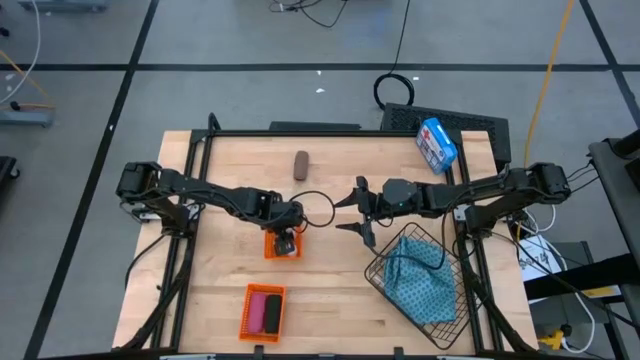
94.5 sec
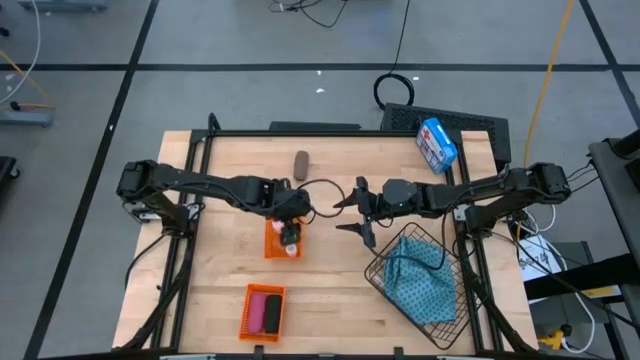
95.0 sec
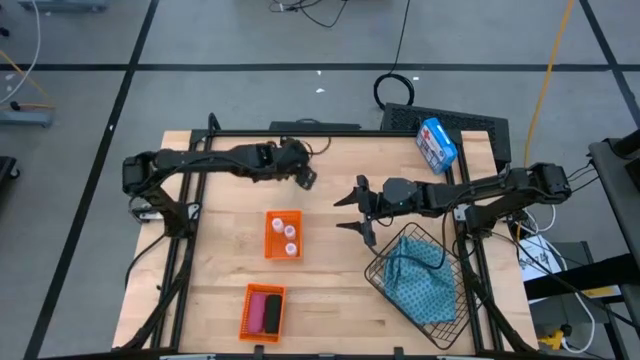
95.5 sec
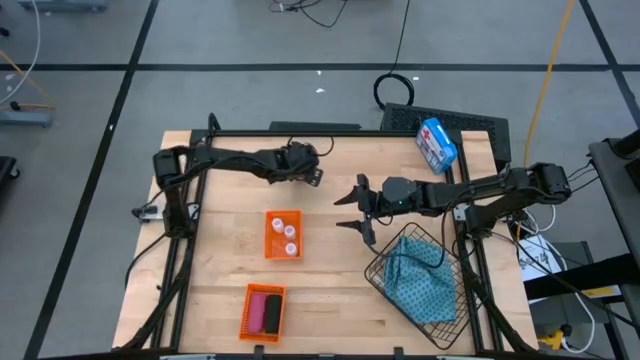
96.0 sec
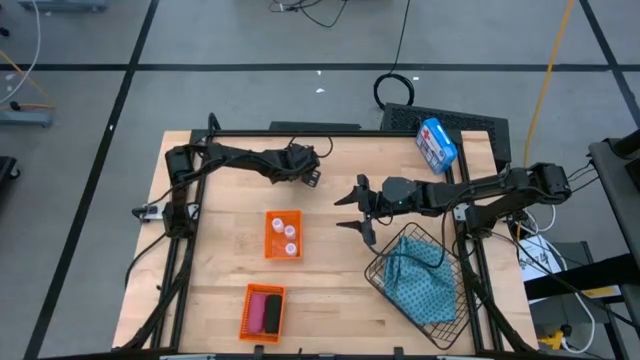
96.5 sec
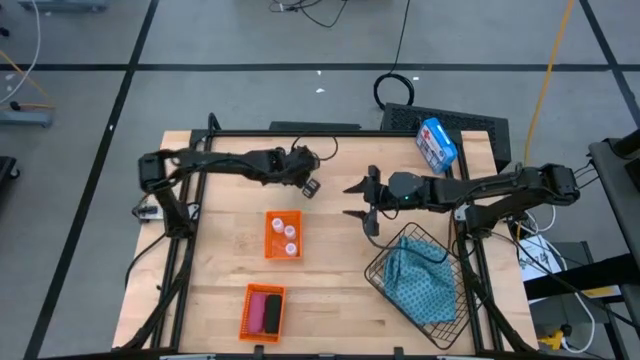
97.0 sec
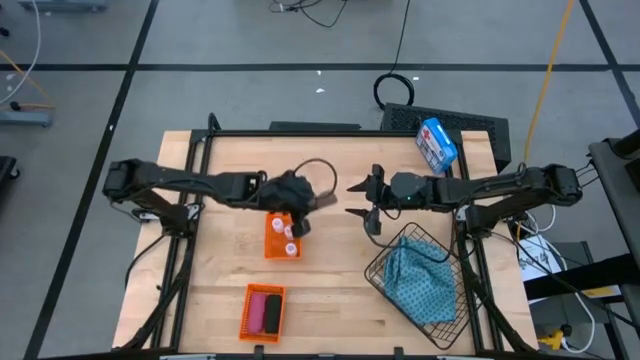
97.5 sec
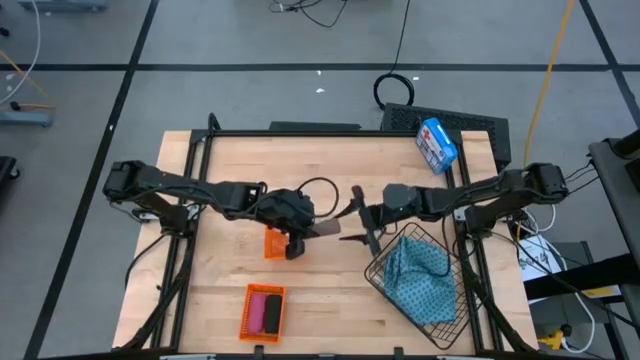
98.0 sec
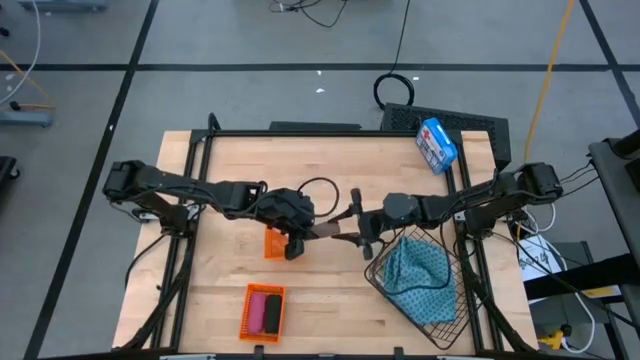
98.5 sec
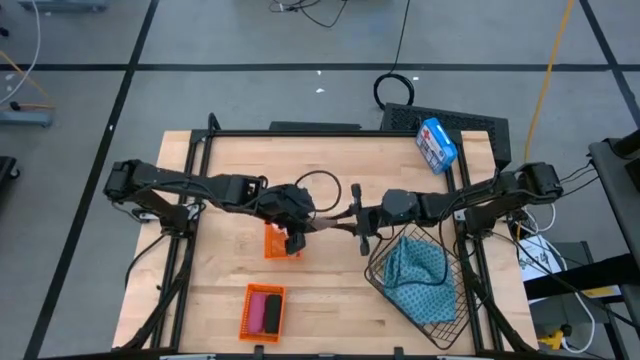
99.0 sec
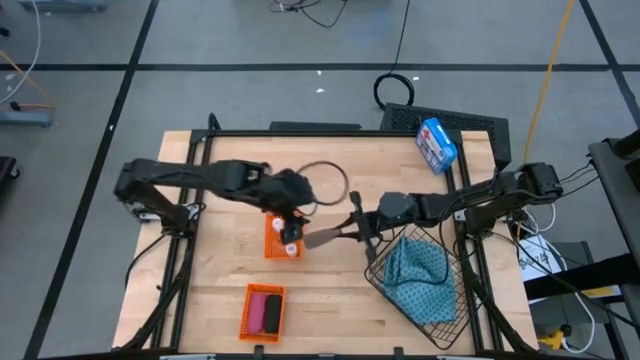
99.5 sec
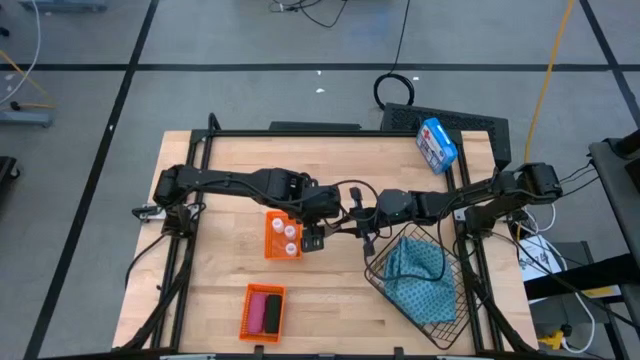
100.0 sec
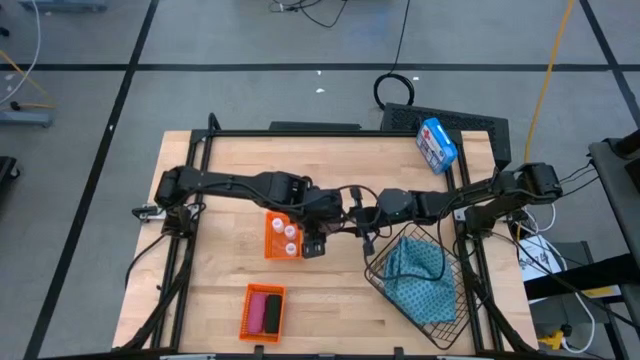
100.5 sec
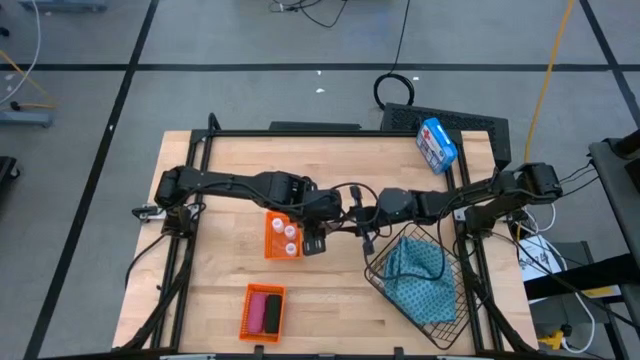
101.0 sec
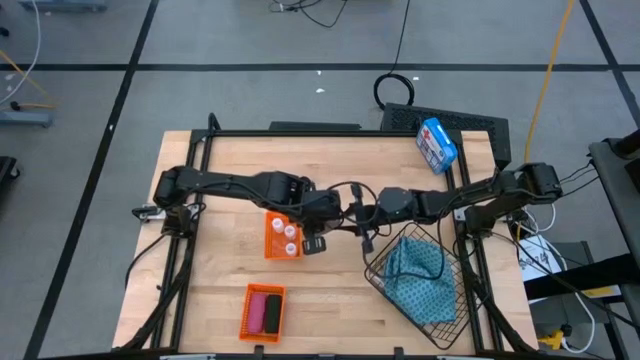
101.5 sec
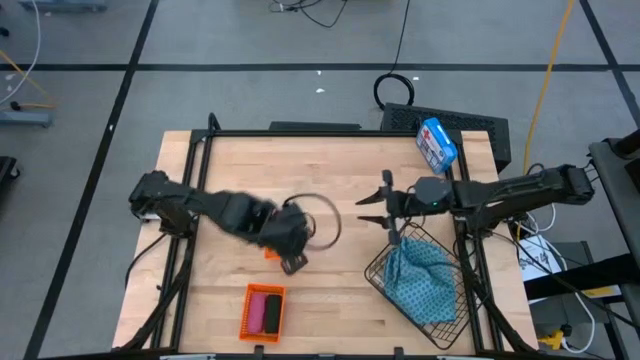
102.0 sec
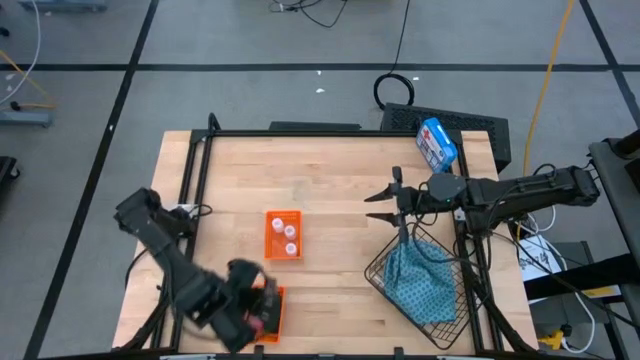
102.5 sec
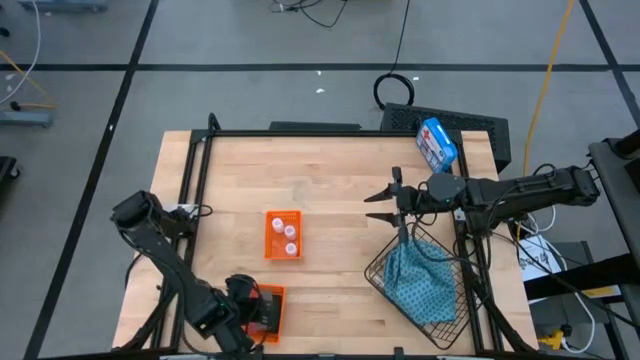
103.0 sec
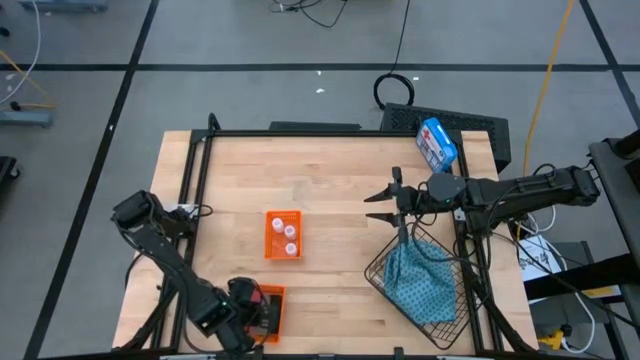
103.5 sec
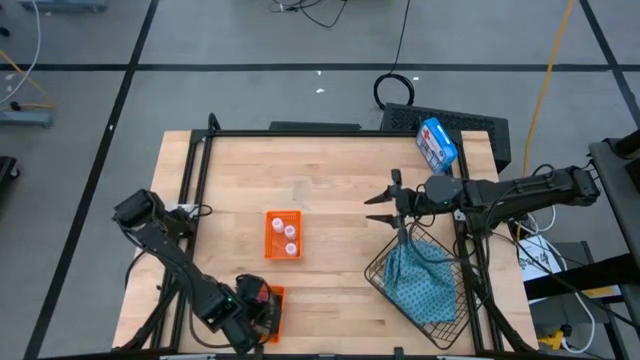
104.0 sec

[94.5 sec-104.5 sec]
Task: Pick & Place Medicine items
Put the brown bandage into the bottom orange basket

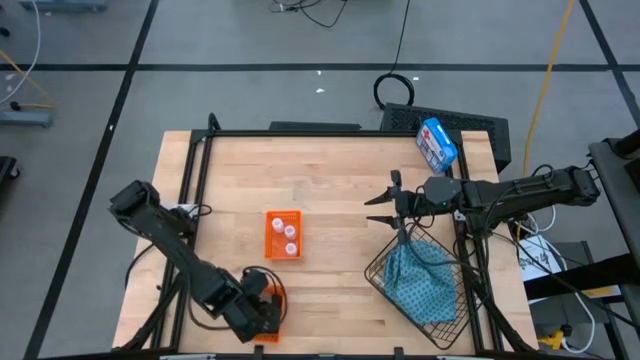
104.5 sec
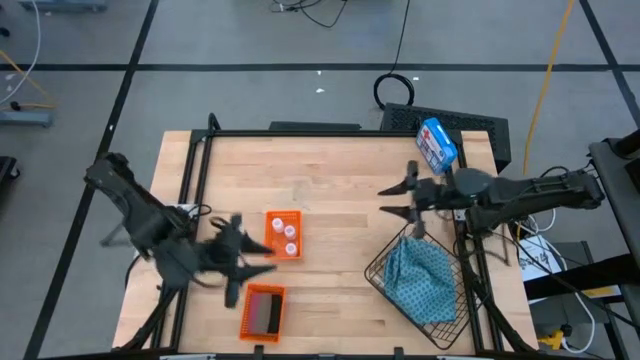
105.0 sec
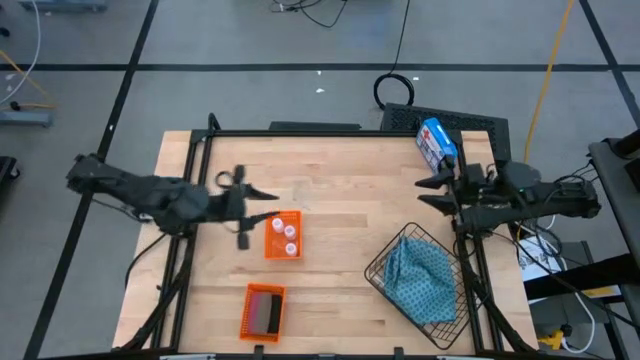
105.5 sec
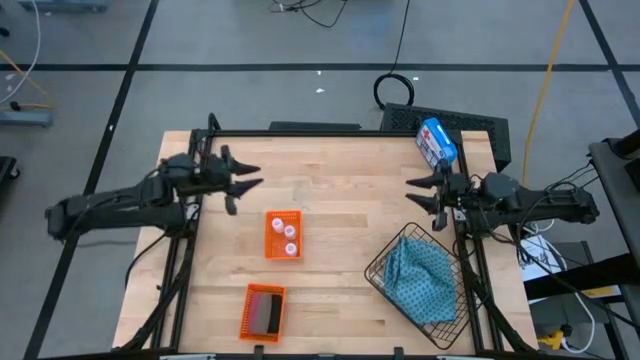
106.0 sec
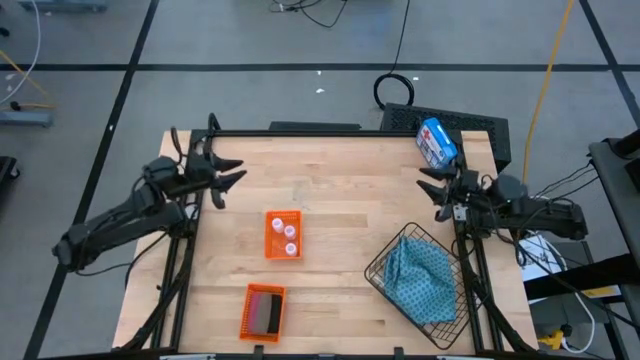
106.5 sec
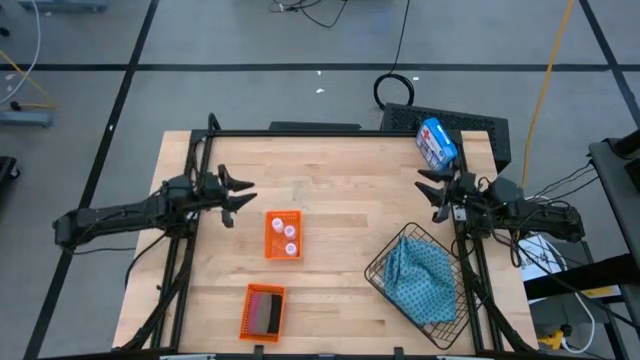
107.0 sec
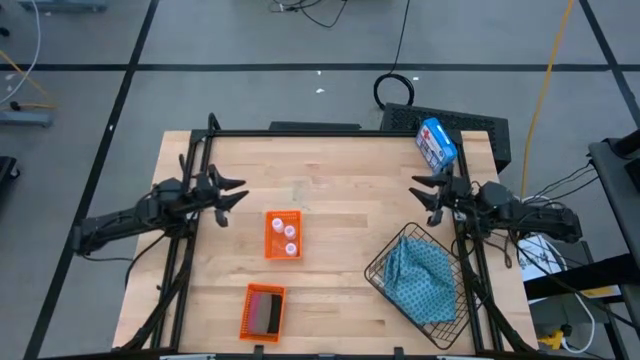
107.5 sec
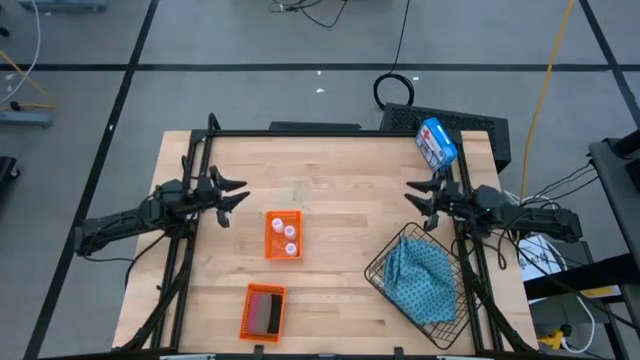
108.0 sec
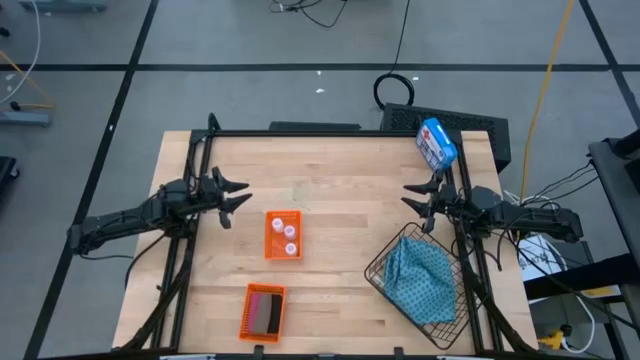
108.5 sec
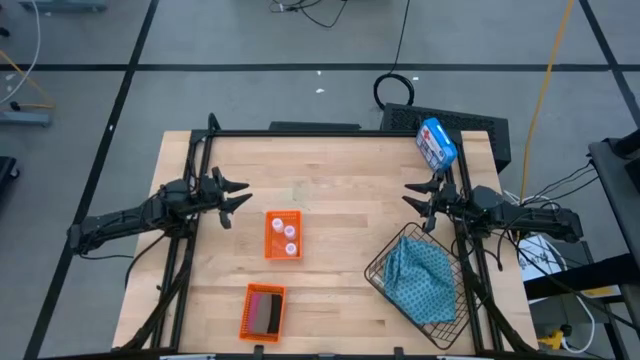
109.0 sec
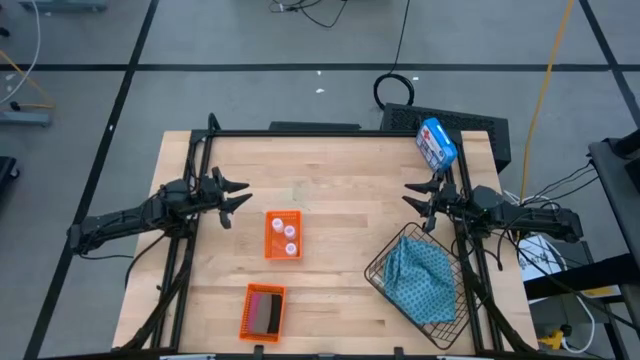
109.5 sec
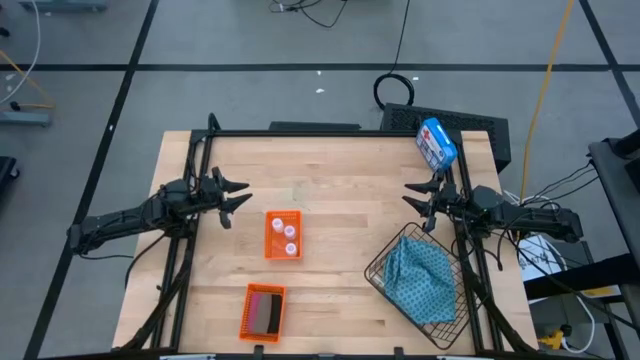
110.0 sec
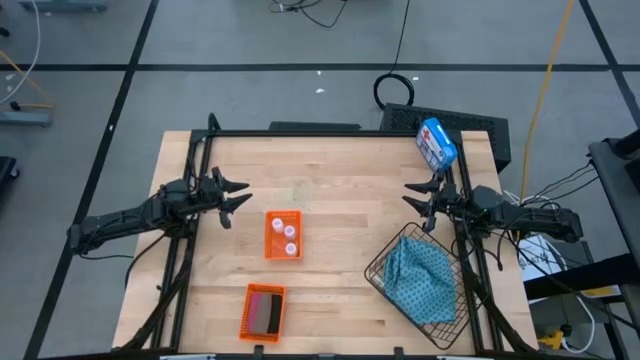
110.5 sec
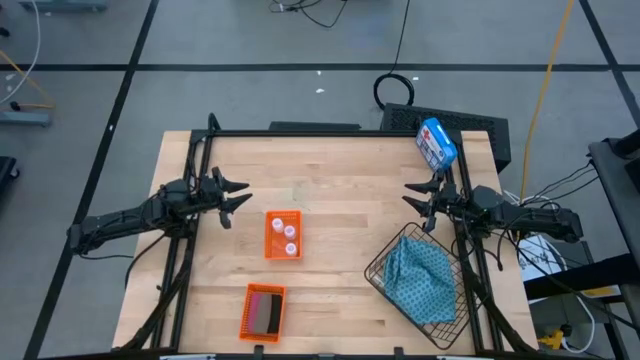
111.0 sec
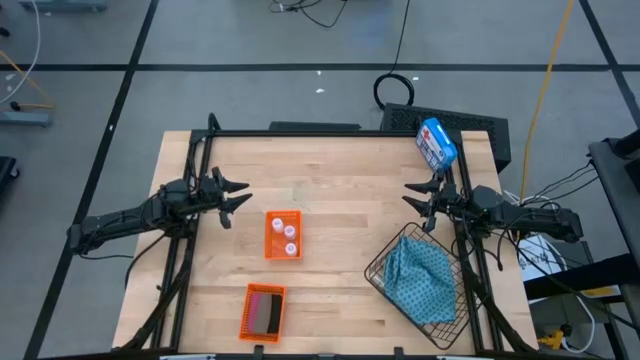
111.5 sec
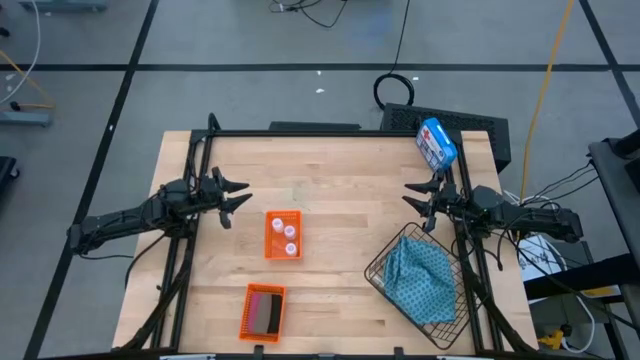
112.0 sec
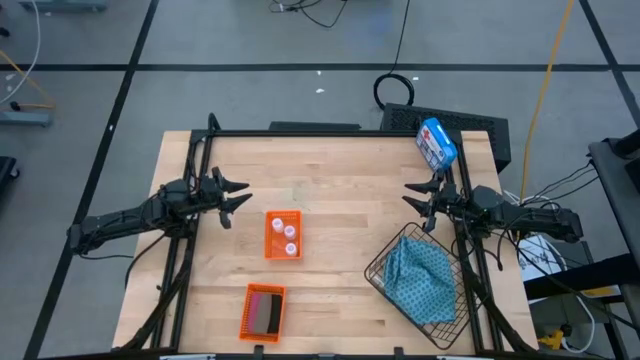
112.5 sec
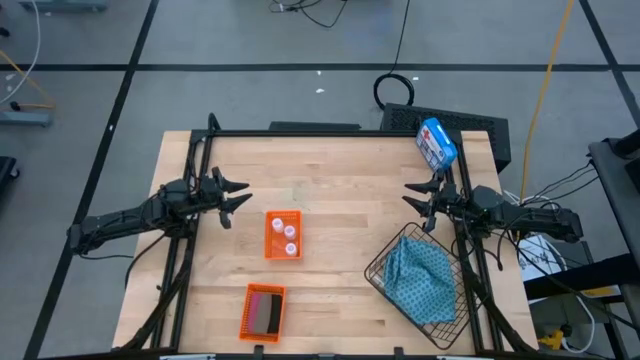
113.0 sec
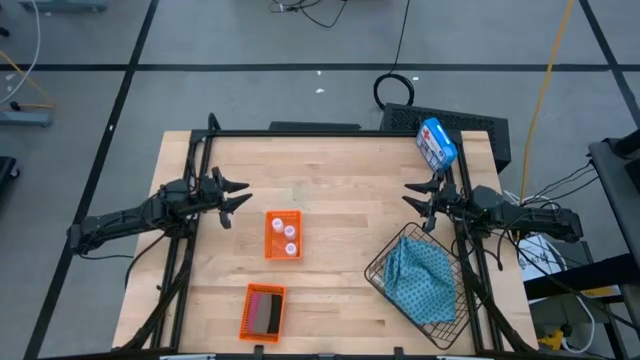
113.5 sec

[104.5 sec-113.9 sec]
Return to Home Position
